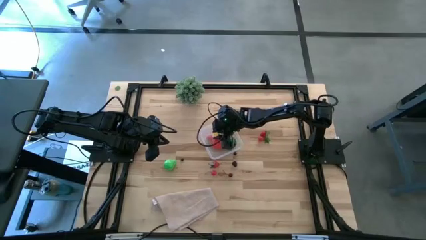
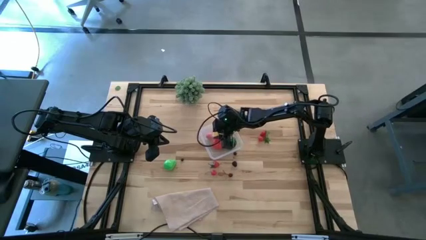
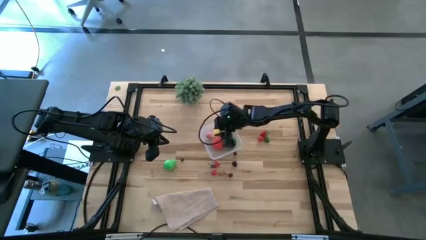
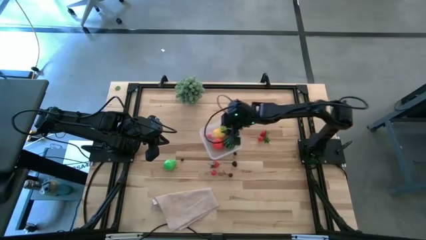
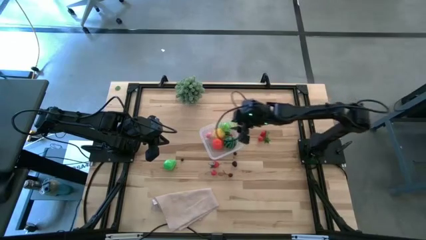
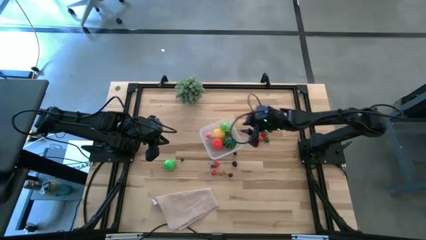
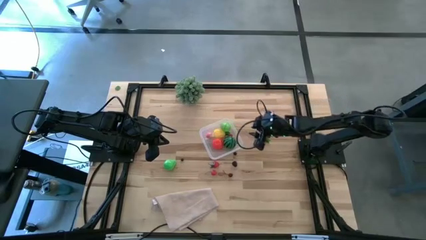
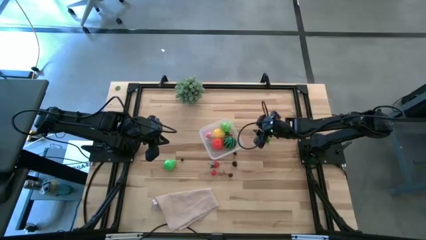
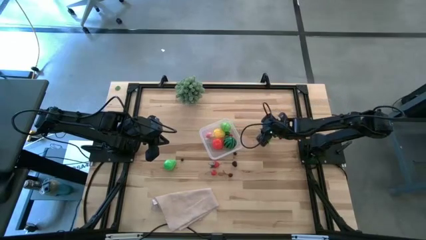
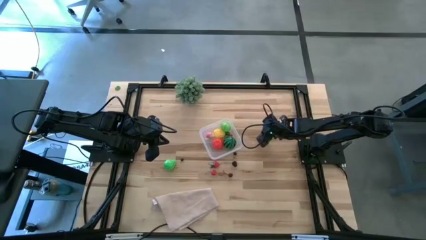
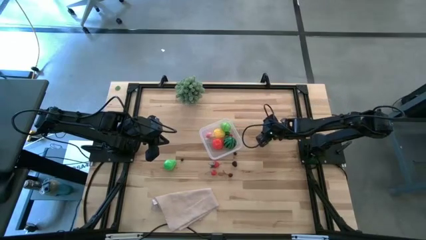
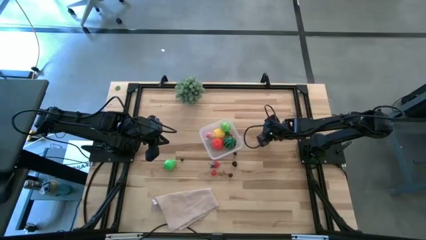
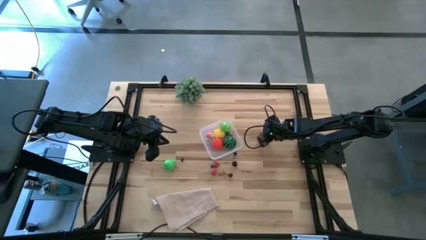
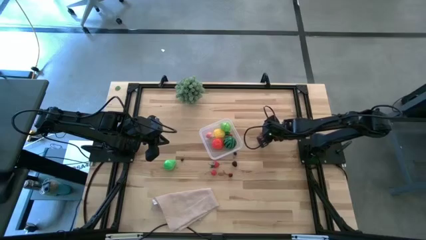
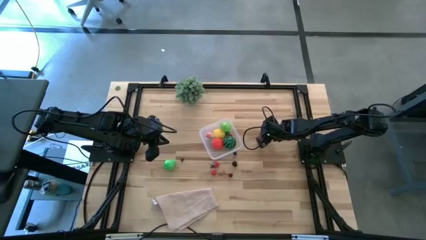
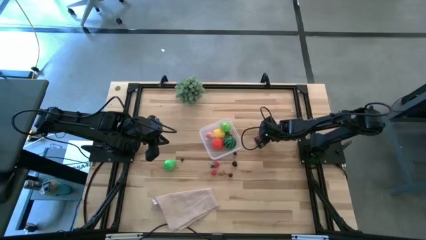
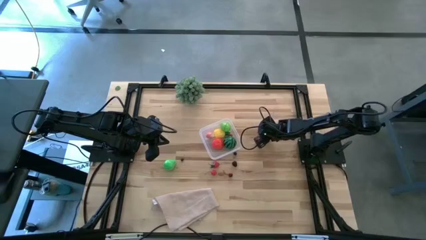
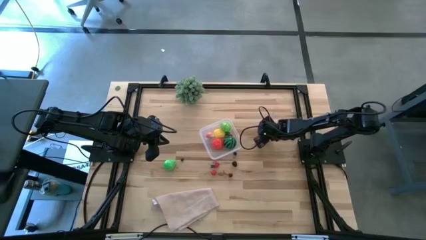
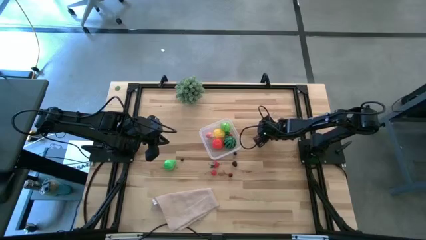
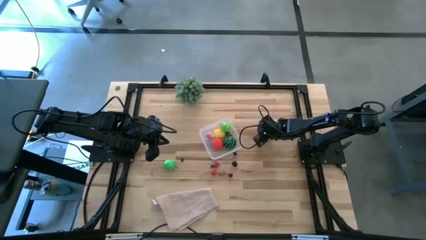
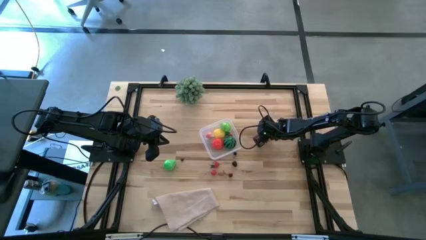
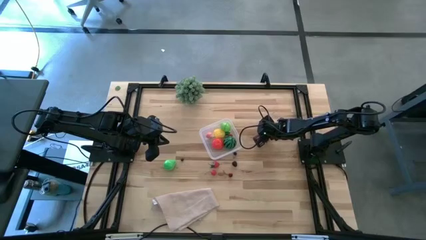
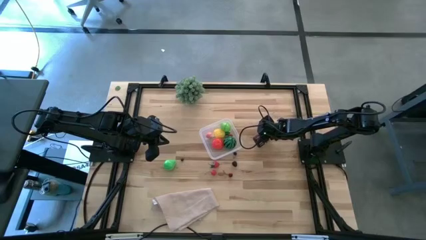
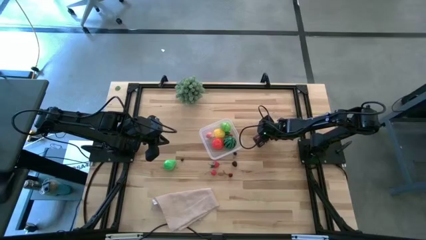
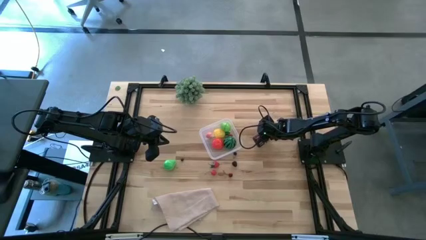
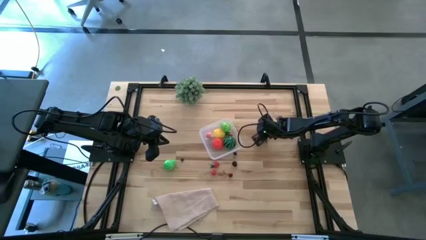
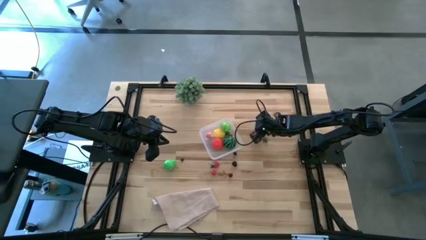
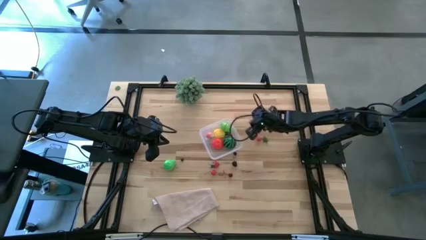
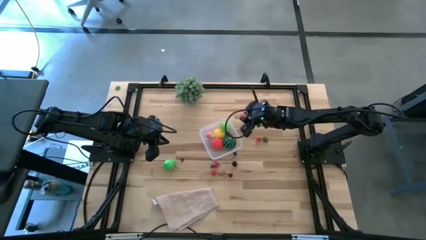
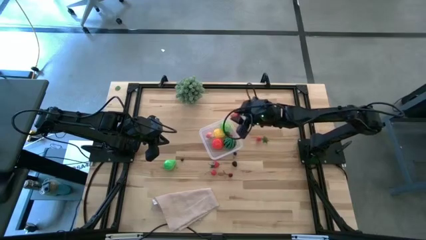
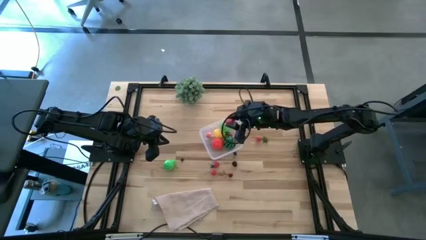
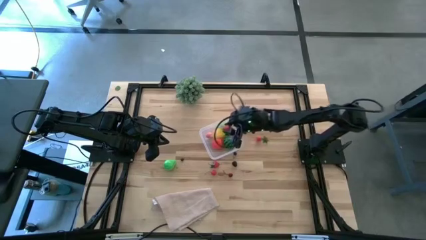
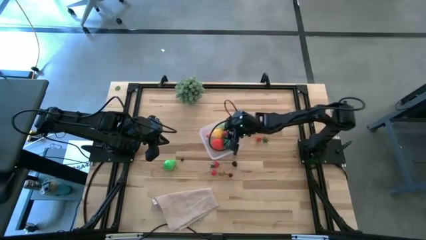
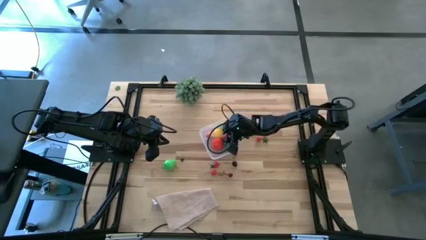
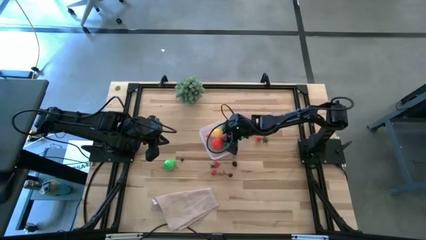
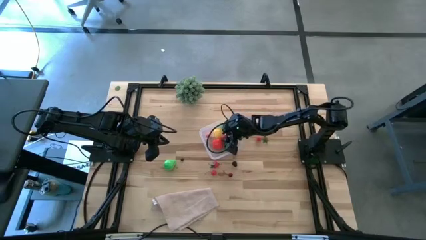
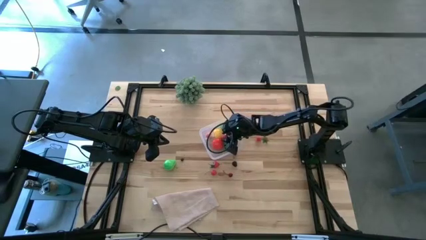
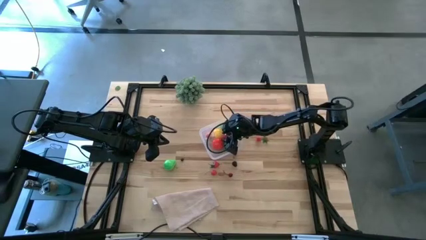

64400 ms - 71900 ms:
Task: Pick and placing Produce into tupperware
Put the red strawberry into the transparent bin

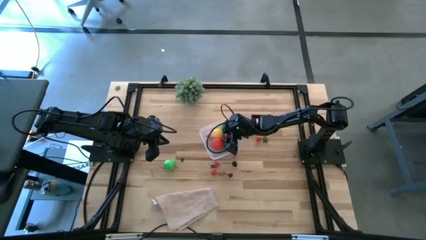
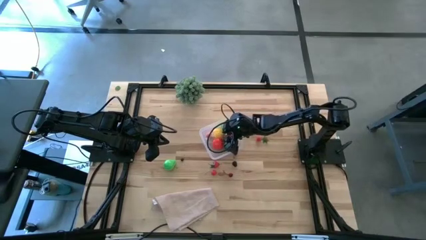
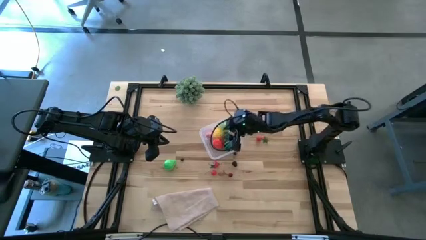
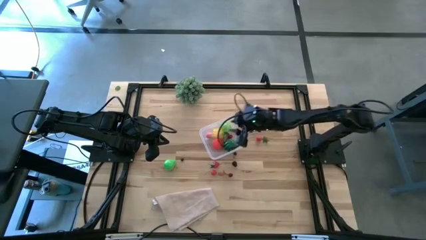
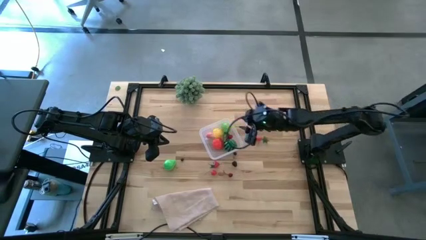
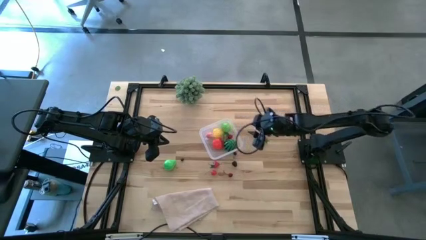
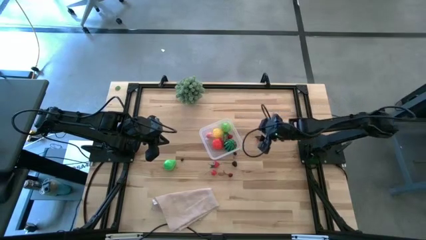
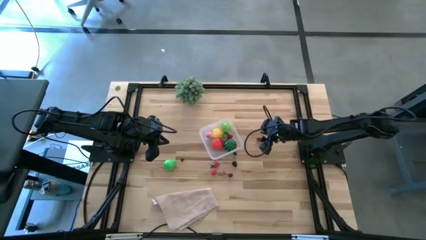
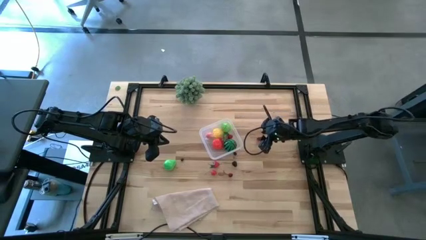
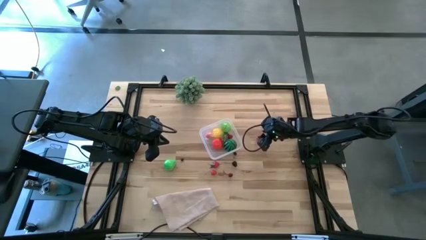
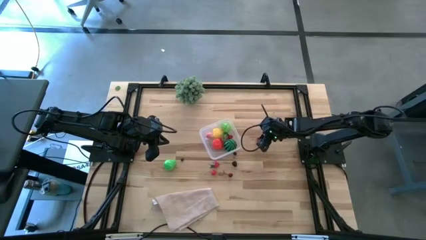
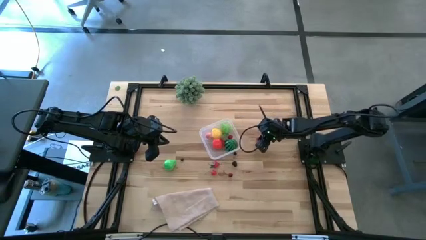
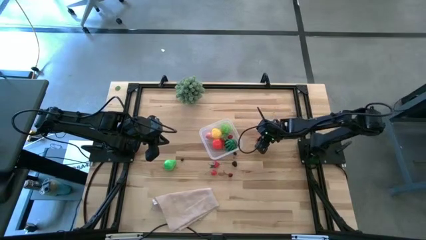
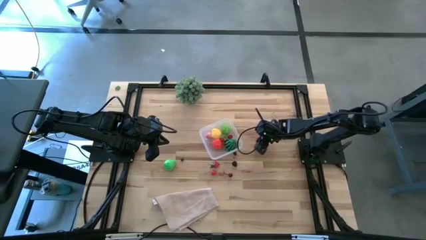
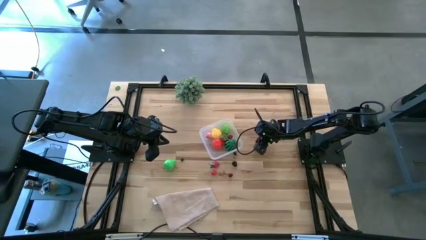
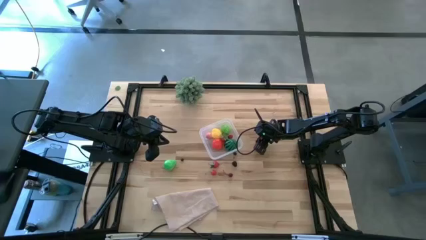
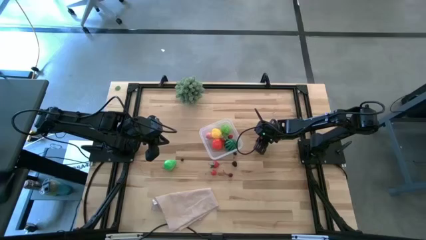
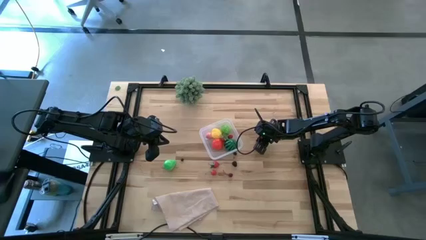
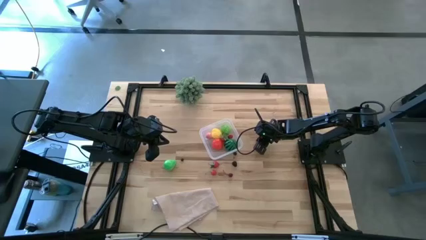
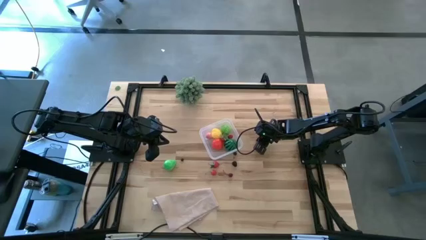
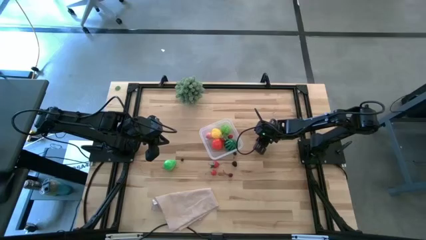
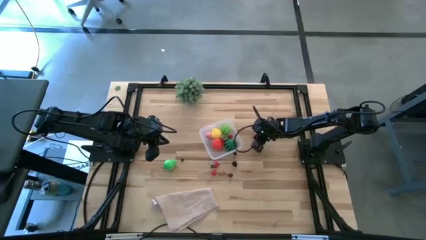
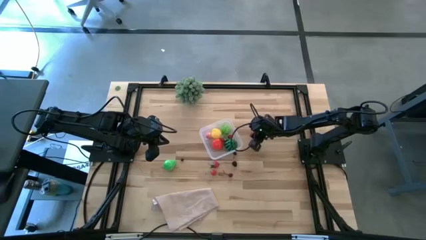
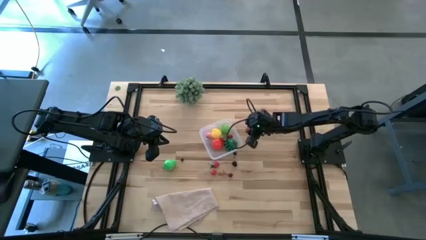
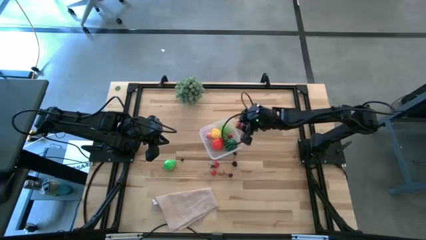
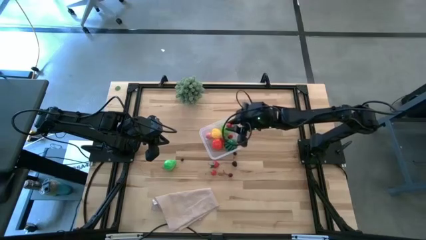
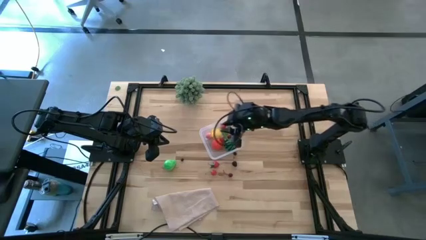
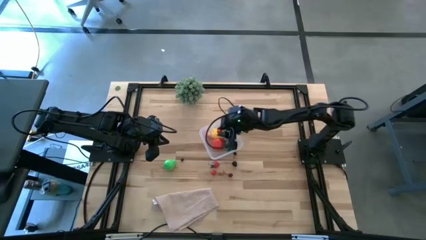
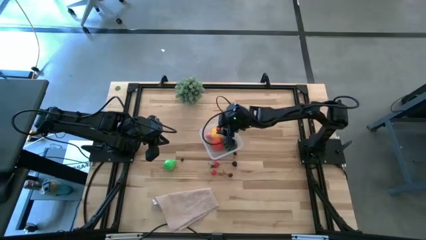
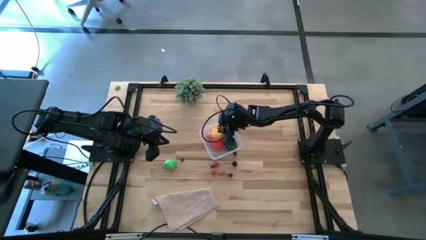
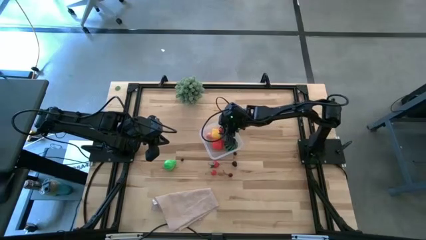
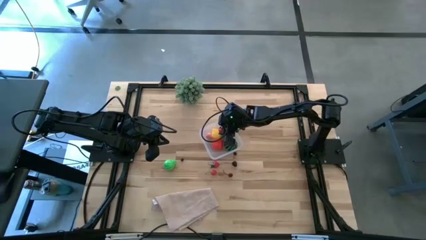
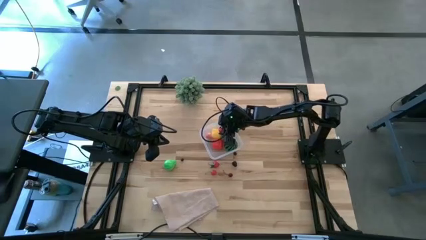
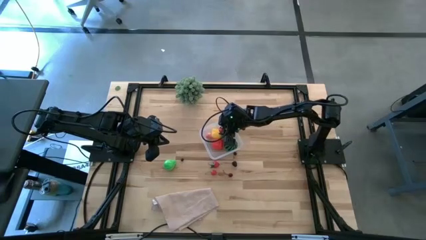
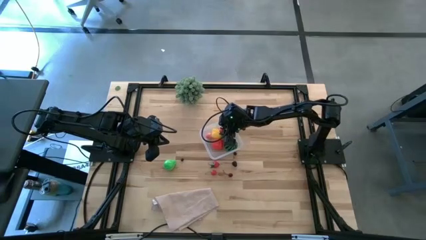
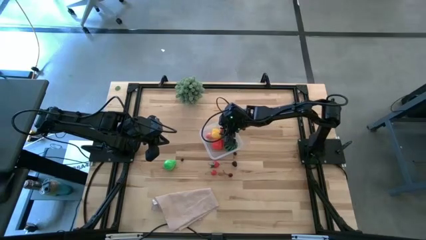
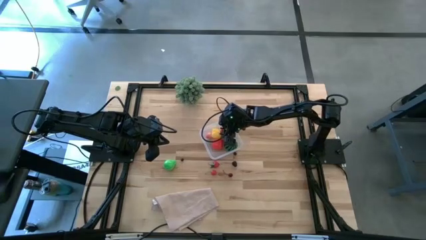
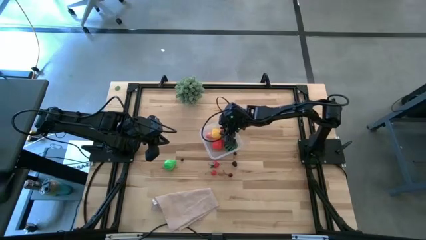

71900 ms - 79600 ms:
Put the red cherry into the transparent bin

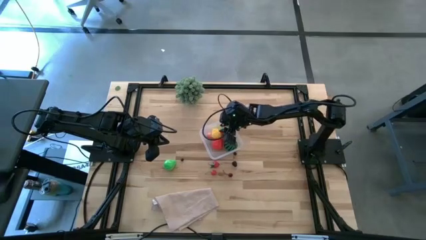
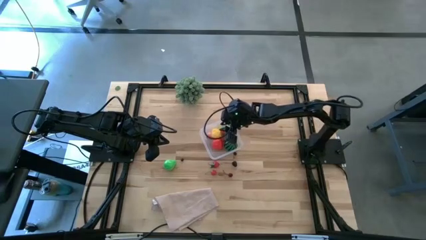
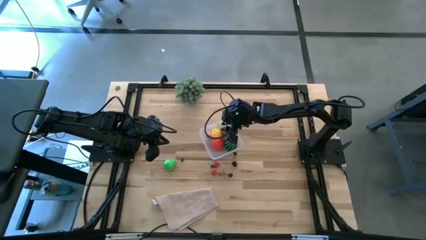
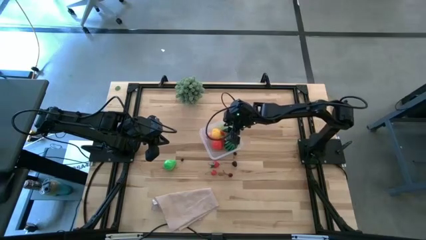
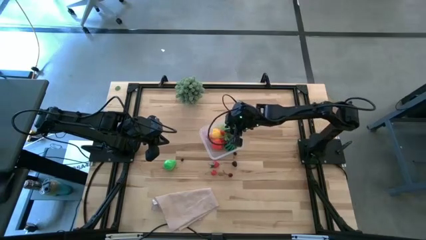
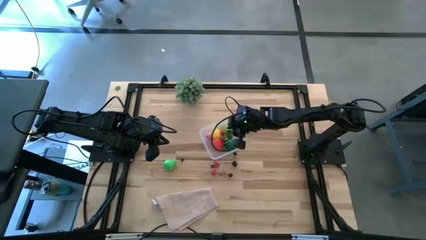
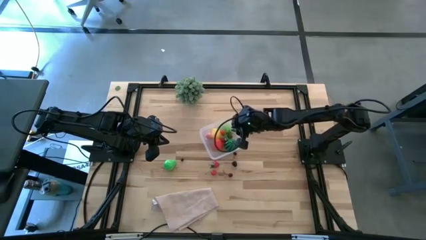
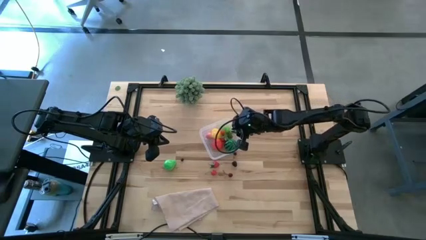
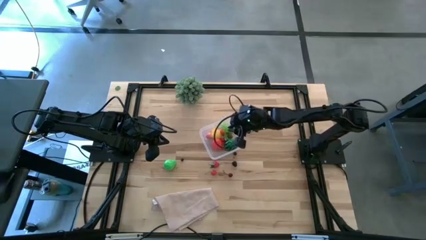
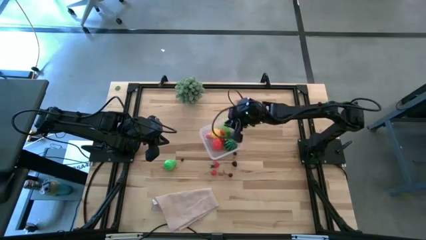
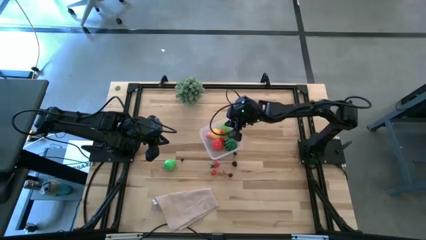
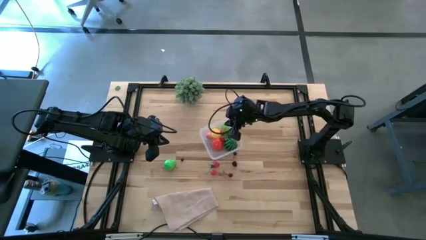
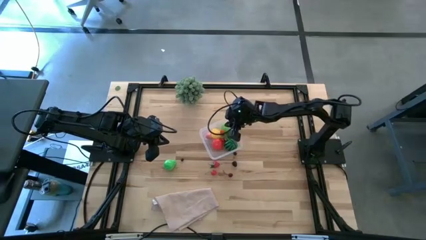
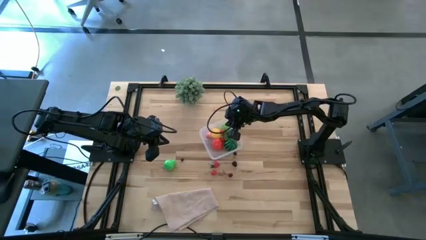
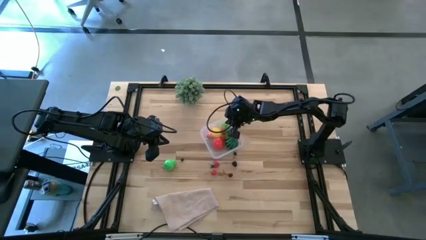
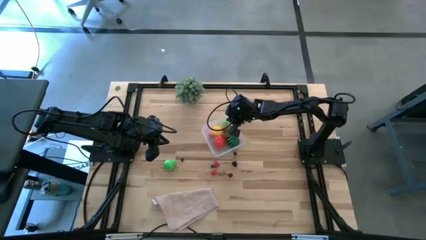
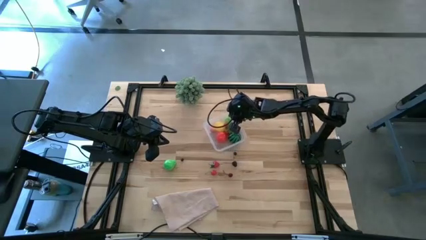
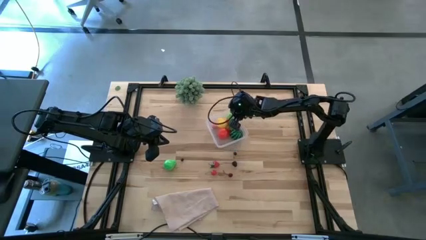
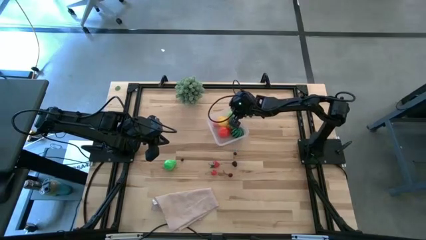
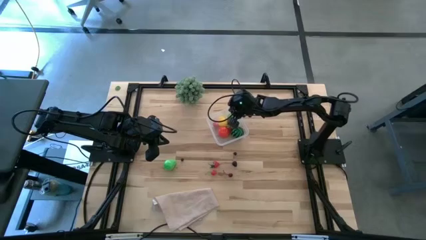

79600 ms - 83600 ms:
Adjust the transparent bin
